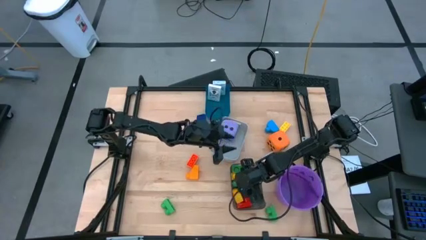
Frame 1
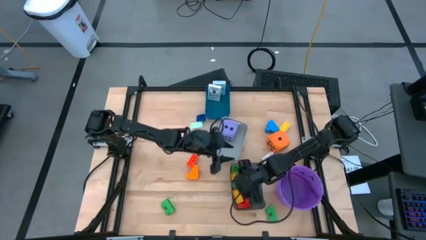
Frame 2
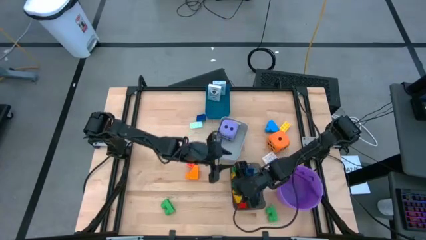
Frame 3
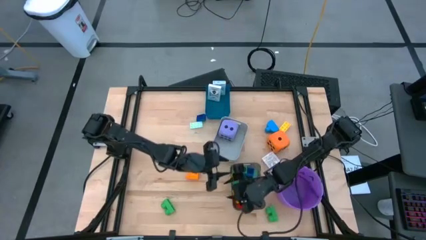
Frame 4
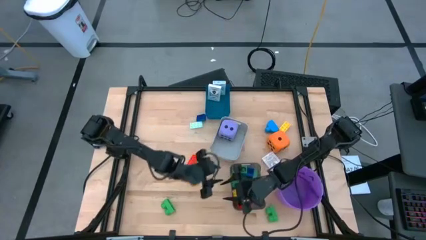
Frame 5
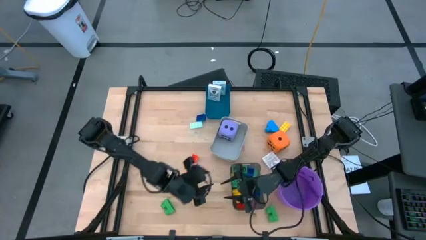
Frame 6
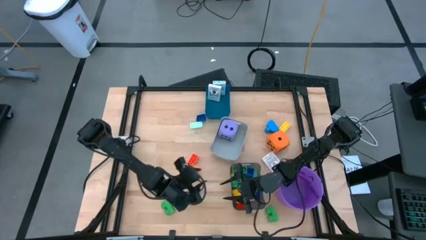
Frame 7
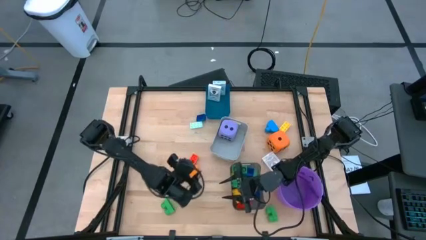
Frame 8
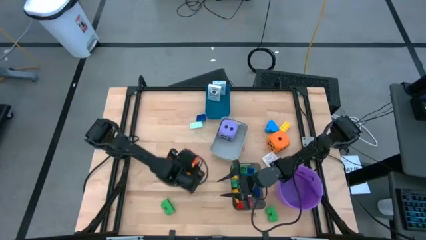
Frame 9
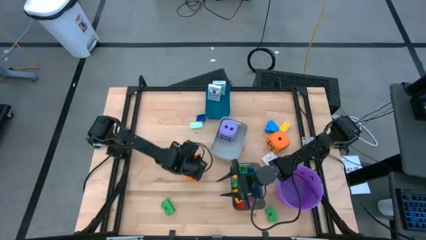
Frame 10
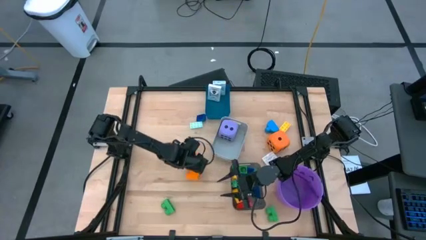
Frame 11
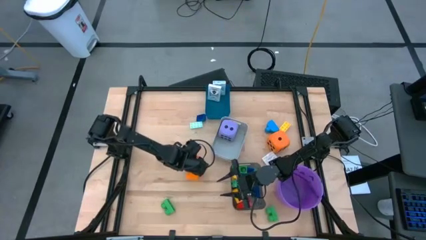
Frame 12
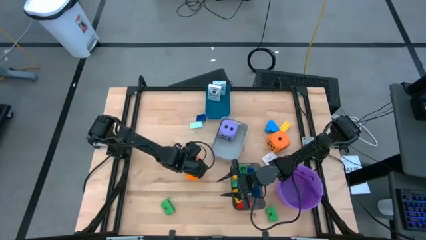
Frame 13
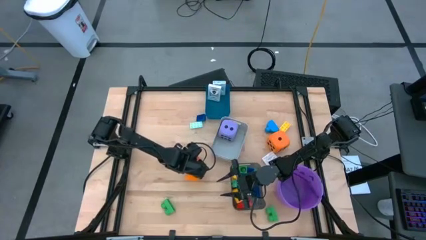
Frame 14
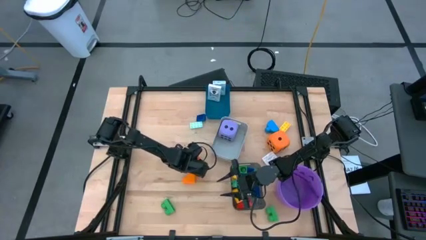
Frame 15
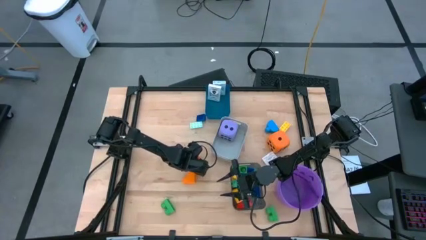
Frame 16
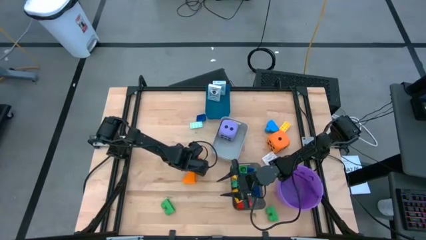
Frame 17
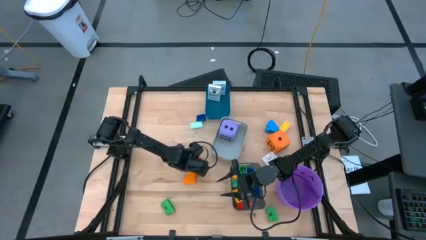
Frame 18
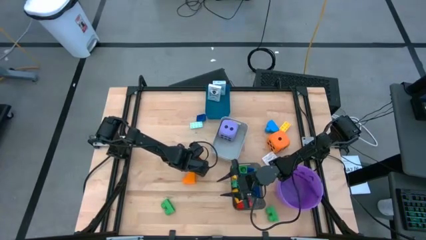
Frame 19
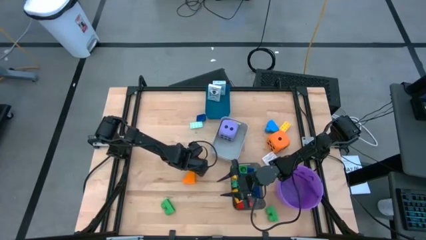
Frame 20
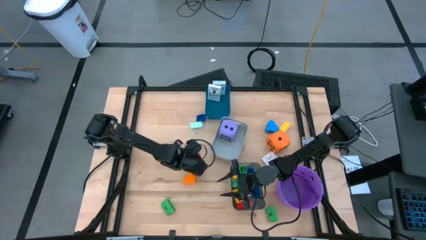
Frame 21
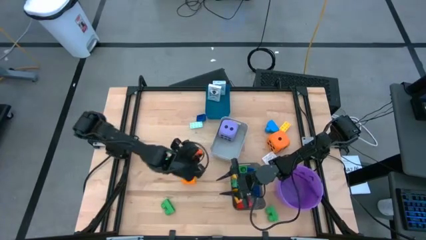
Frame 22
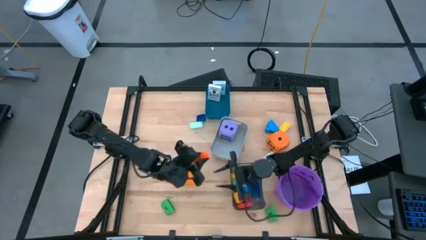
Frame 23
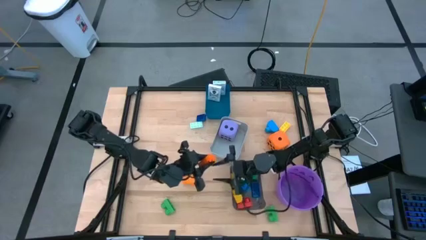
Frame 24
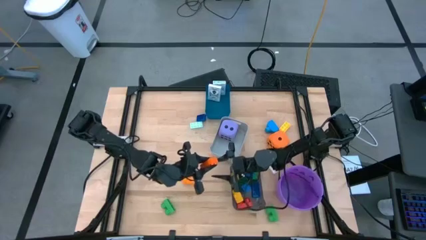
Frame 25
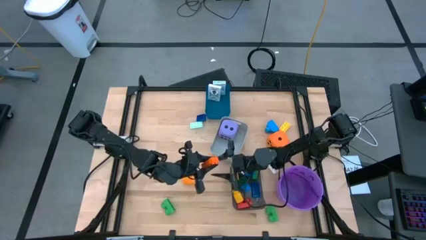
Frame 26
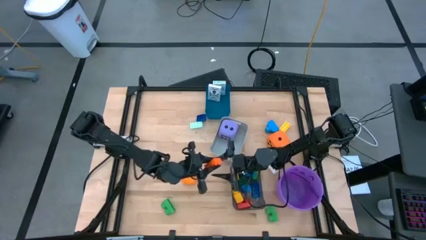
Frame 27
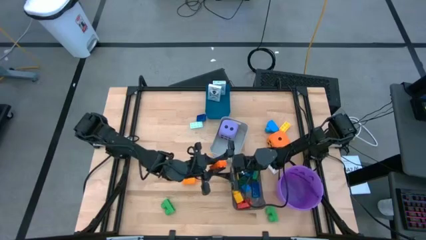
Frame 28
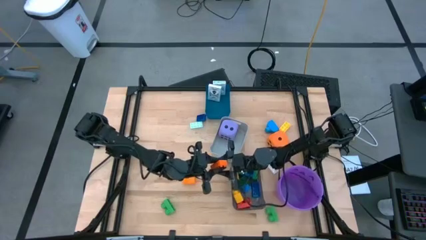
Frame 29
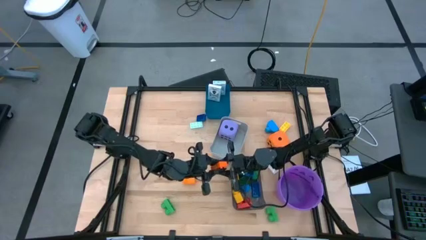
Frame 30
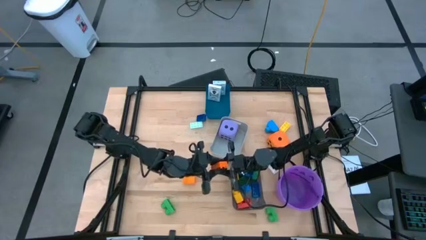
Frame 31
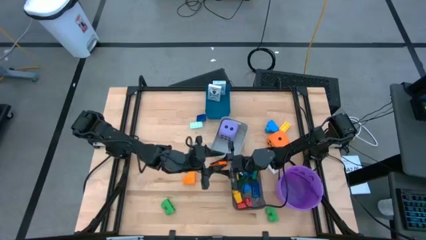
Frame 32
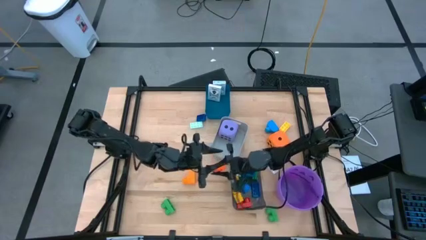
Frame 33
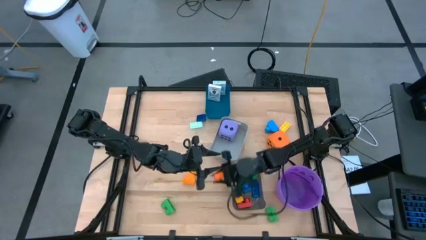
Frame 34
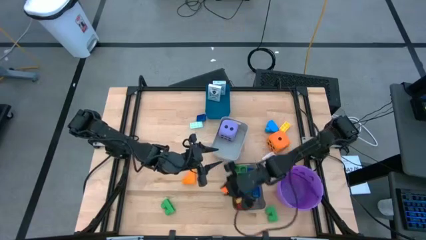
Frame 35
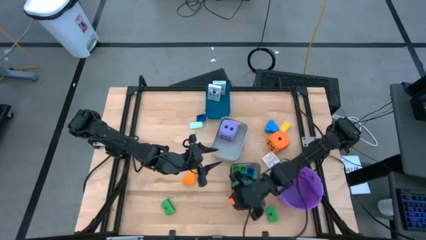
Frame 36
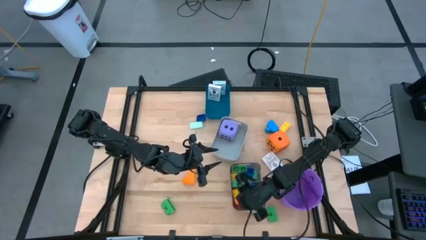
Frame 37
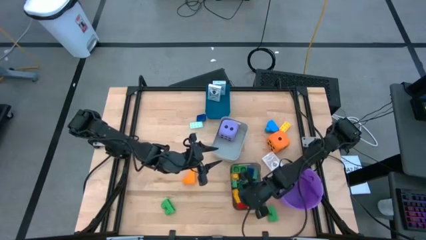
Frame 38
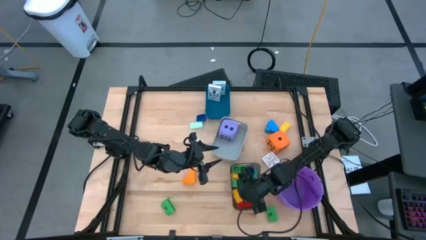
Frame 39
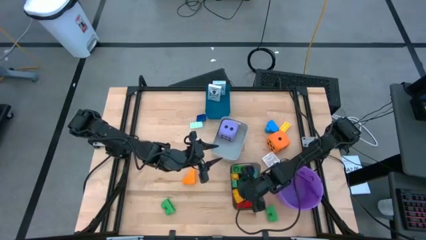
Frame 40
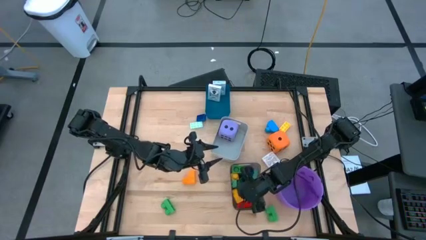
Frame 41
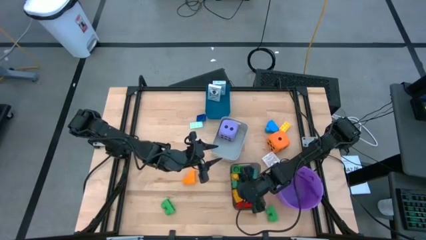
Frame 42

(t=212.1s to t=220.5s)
Task: Pick & Place Toys
Put the orange game piece into the black bin

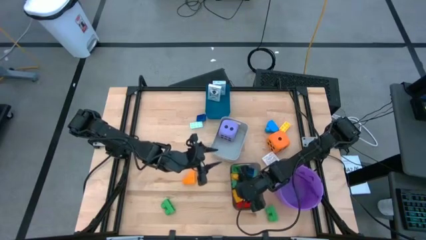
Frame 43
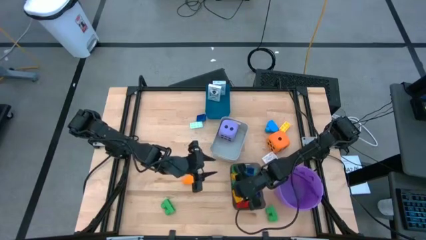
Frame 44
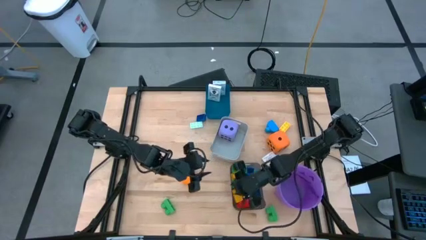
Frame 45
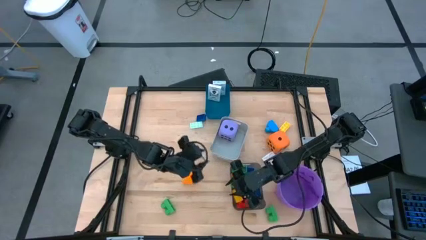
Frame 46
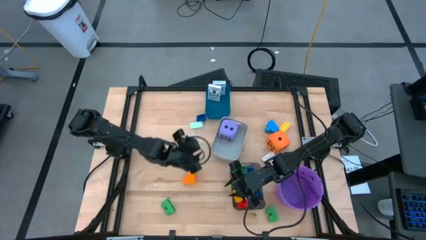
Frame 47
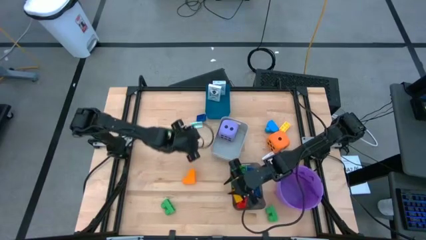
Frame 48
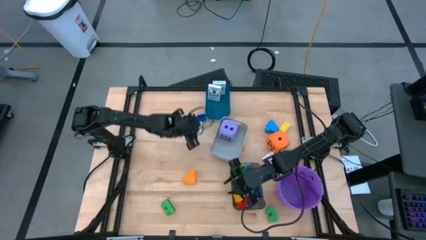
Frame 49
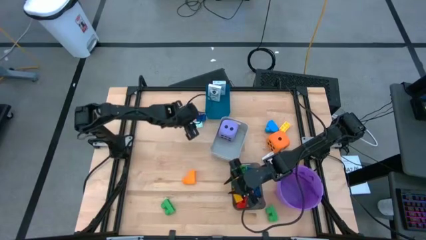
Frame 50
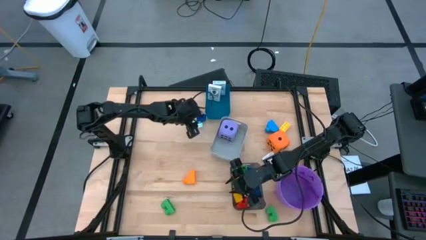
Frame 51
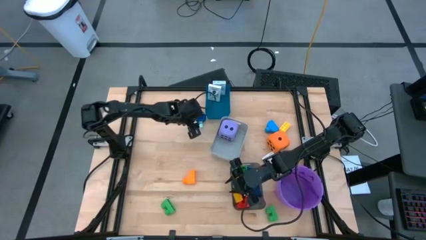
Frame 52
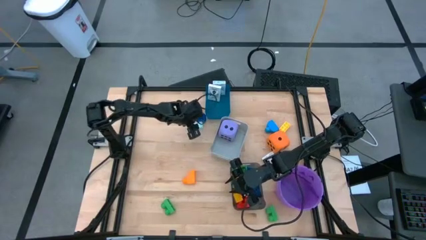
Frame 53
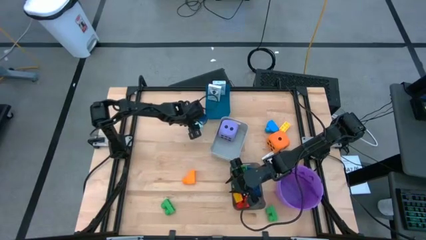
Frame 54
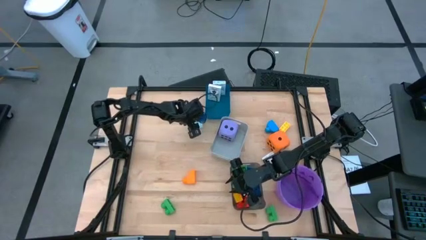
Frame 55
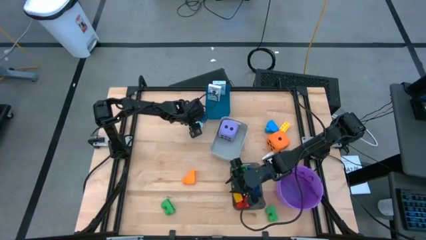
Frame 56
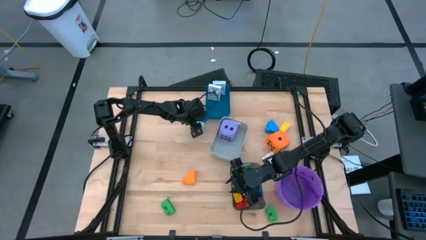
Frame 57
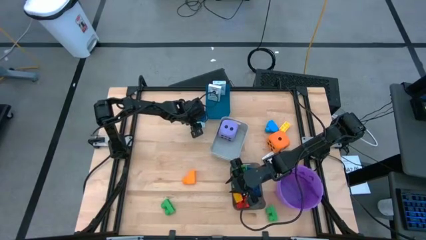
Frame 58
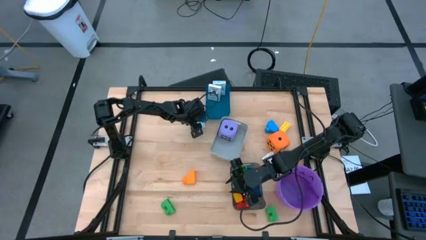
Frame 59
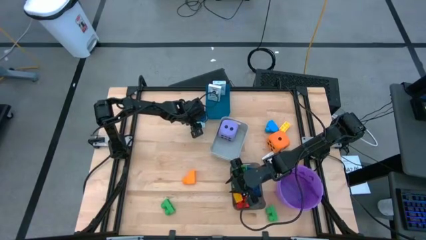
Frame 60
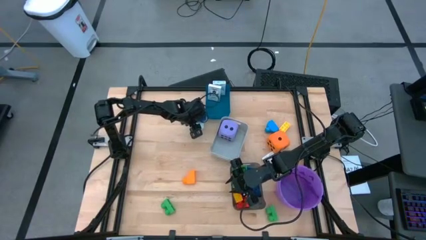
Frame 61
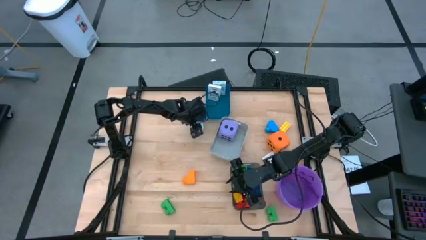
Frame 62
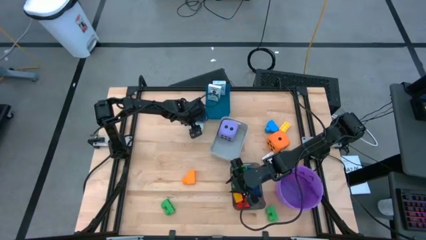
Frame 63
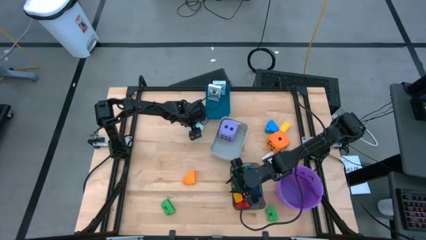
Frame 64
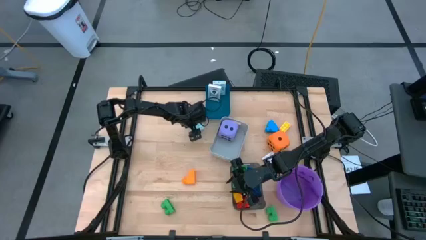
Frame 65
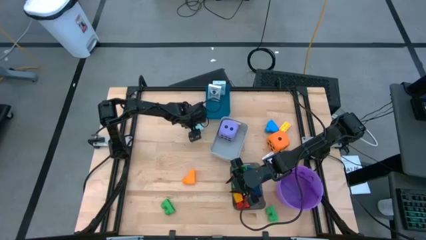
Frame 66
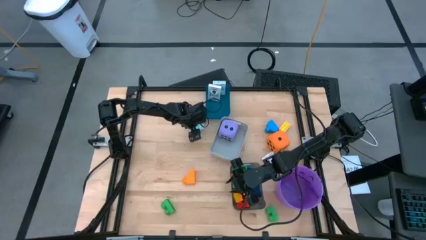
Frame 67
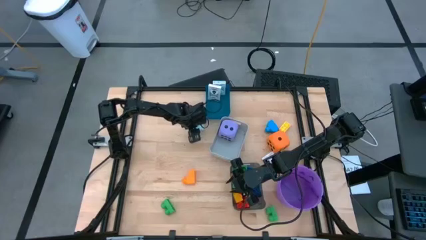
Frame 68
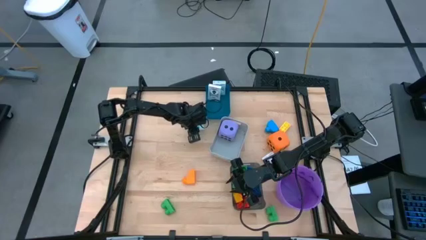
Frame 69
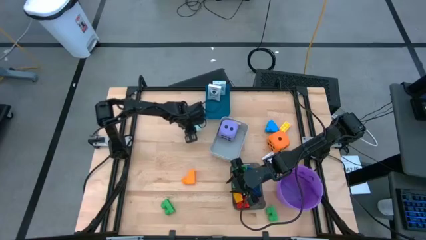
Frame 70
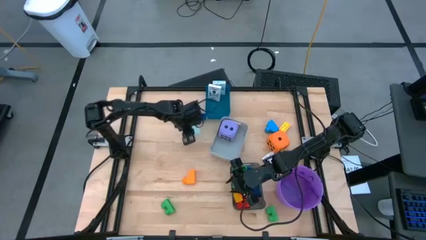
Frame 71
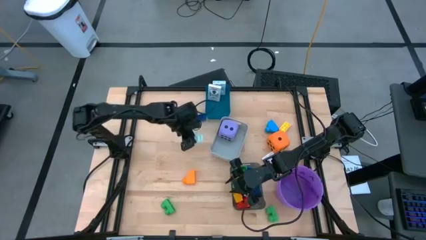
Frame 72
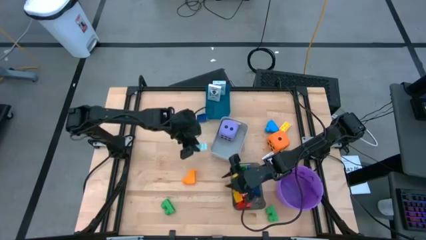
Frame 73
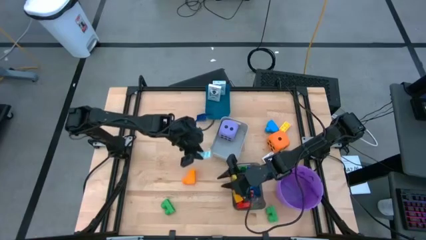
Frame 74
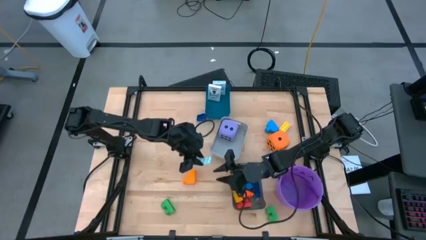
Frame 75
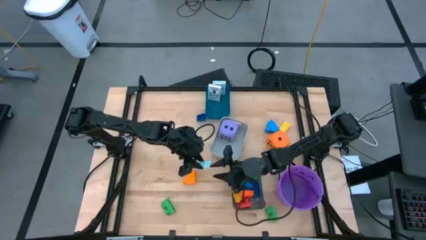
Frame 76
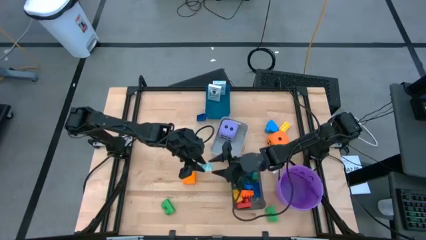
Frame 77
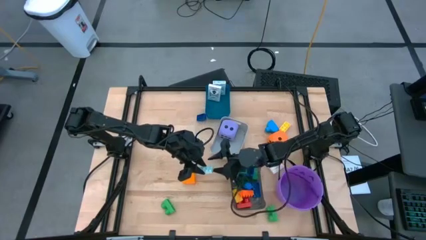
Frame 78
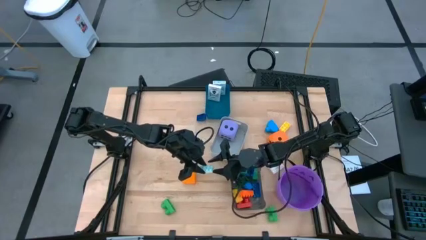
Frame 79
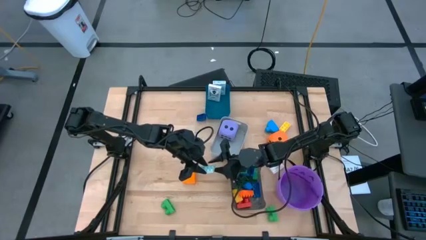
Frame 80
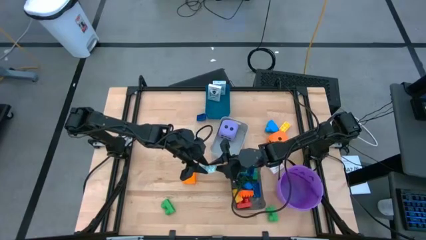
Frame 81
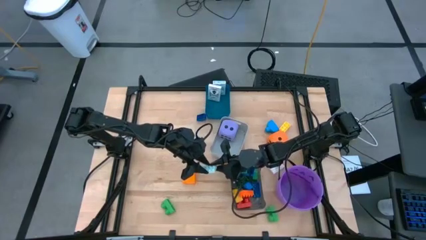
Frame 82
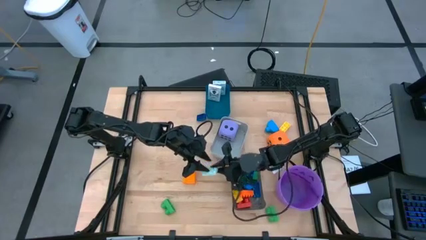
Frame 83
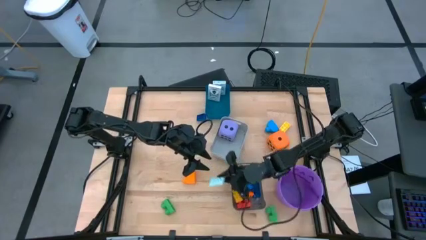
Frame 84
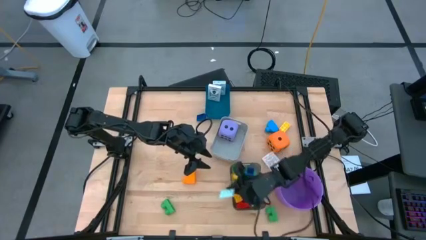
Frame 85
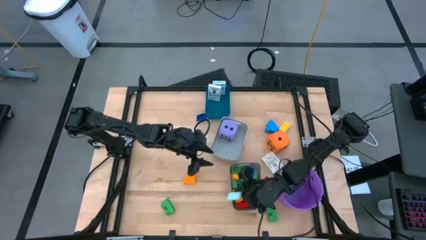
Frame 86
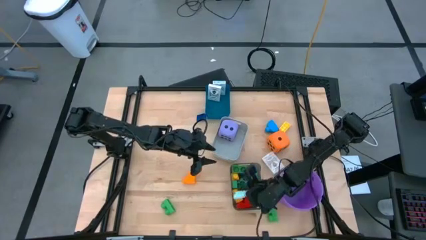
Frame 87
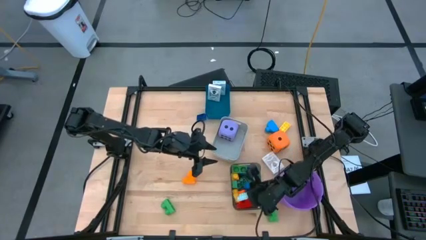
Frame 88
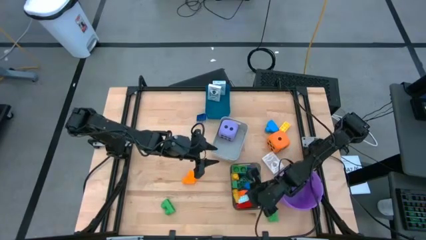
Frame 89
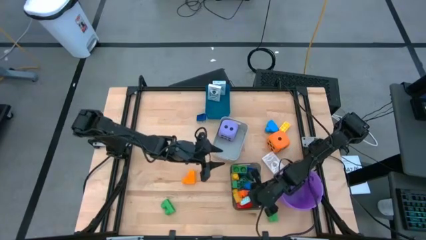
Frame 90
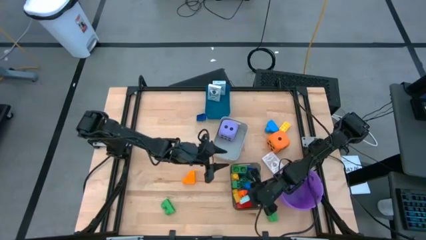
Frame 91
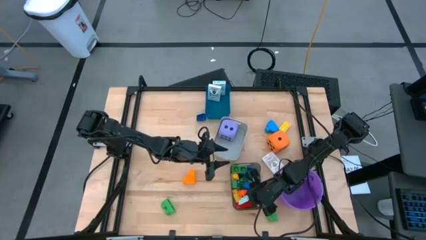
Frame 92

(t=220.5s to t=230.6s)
Put the light blue game piece into the black bin
